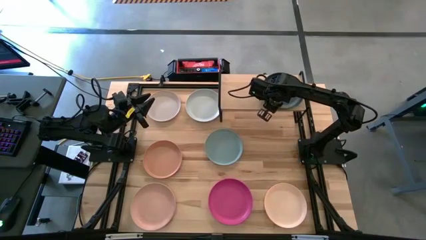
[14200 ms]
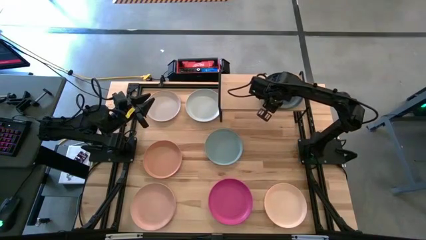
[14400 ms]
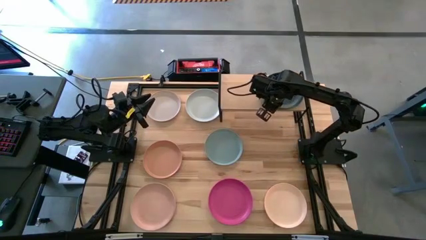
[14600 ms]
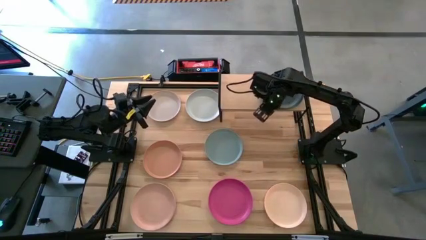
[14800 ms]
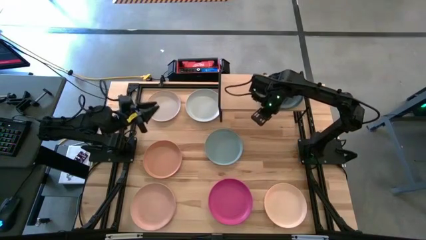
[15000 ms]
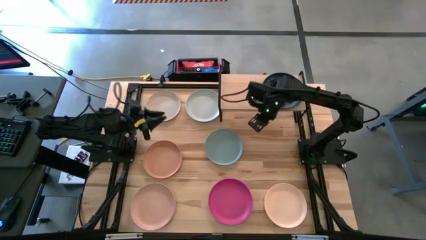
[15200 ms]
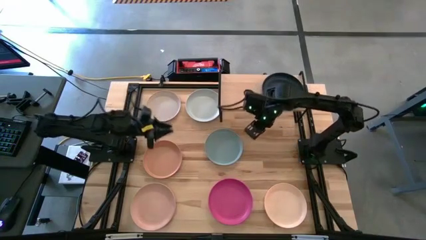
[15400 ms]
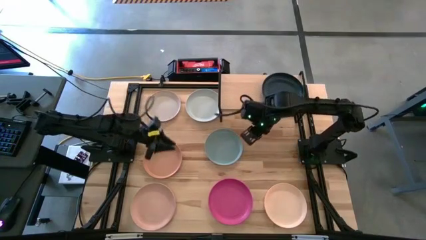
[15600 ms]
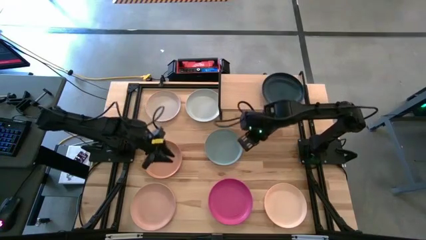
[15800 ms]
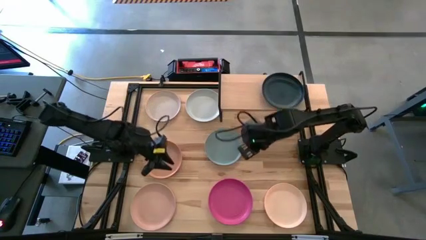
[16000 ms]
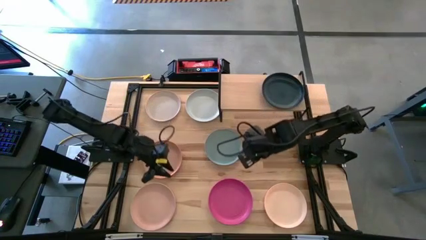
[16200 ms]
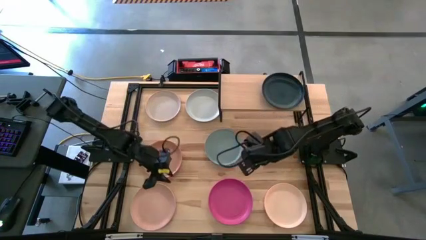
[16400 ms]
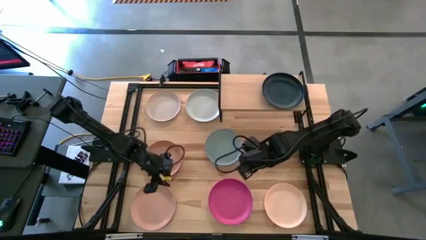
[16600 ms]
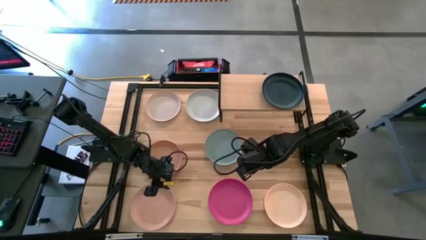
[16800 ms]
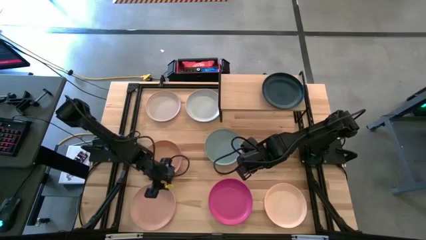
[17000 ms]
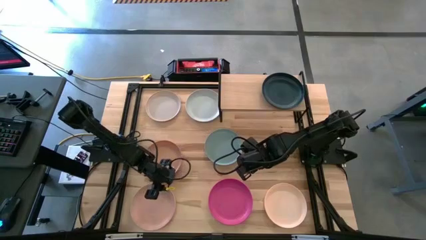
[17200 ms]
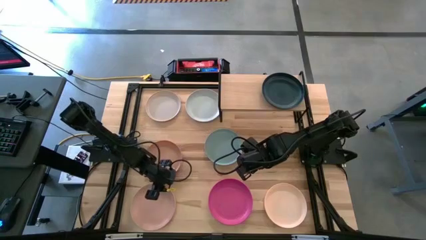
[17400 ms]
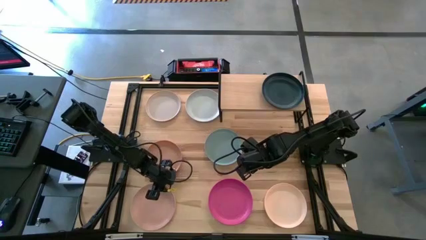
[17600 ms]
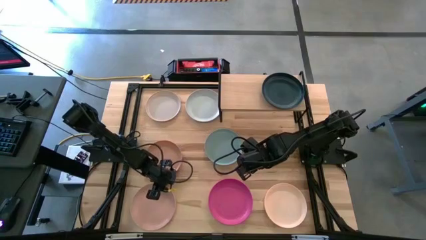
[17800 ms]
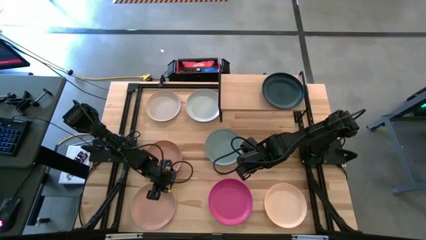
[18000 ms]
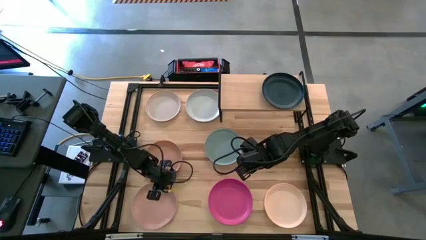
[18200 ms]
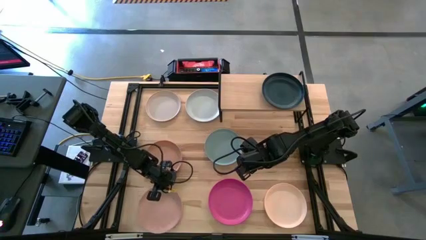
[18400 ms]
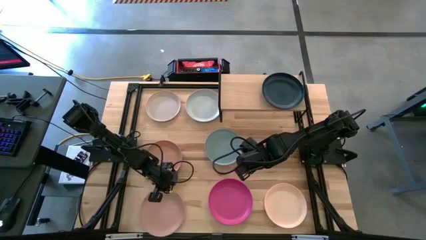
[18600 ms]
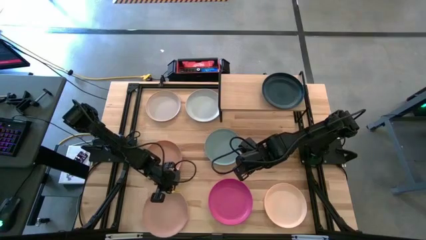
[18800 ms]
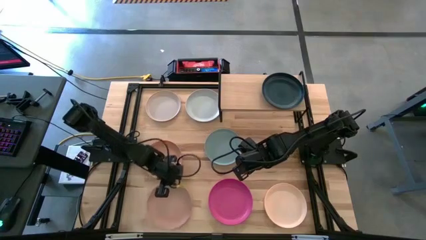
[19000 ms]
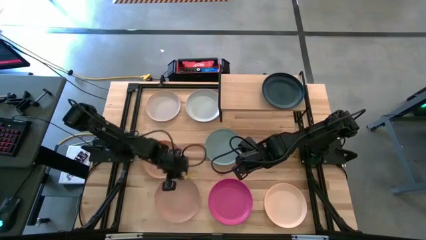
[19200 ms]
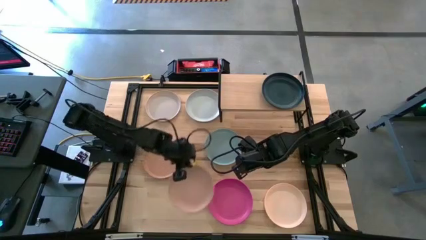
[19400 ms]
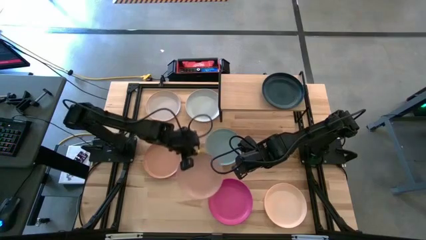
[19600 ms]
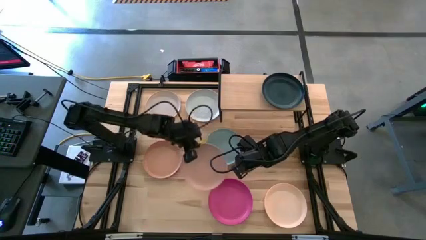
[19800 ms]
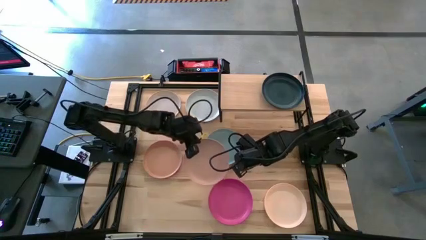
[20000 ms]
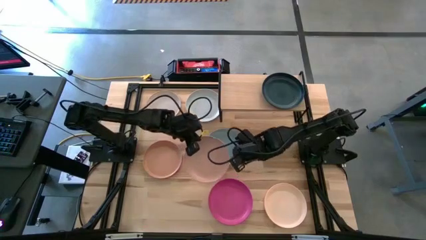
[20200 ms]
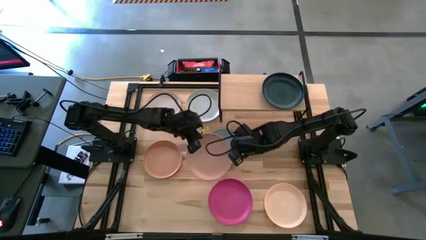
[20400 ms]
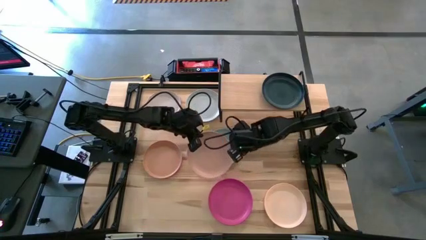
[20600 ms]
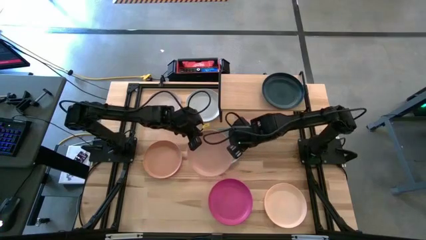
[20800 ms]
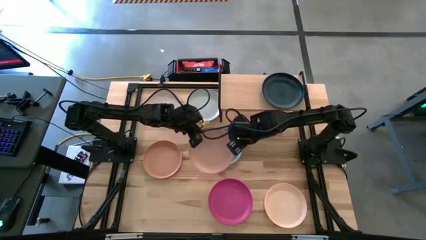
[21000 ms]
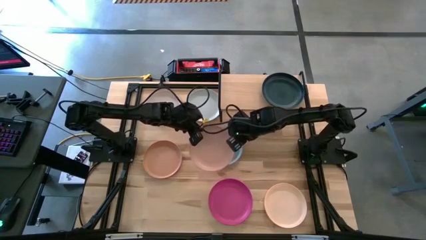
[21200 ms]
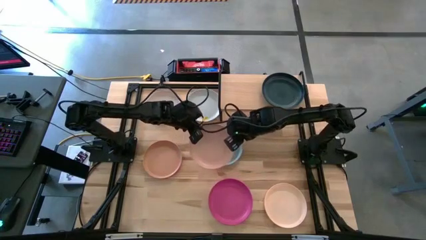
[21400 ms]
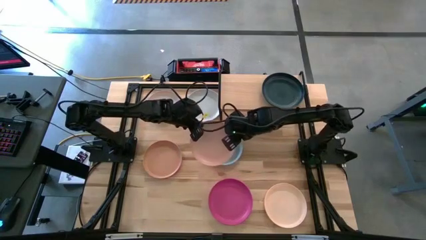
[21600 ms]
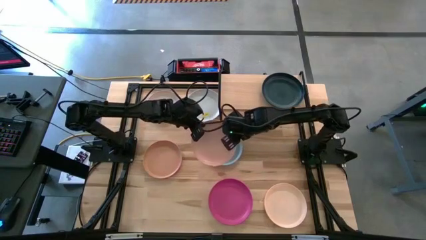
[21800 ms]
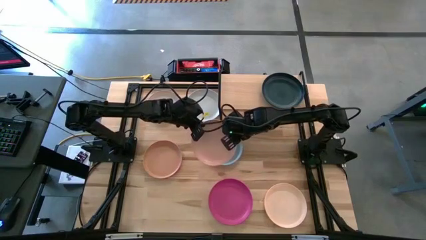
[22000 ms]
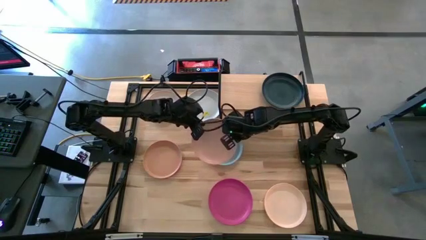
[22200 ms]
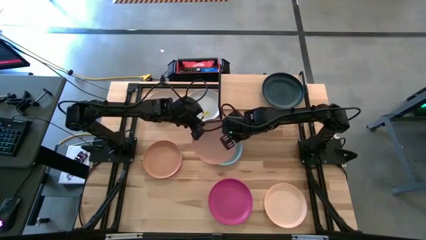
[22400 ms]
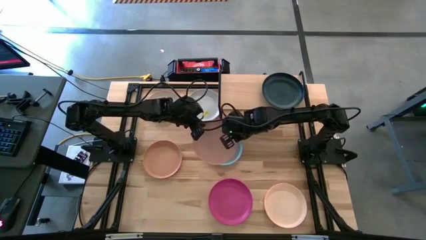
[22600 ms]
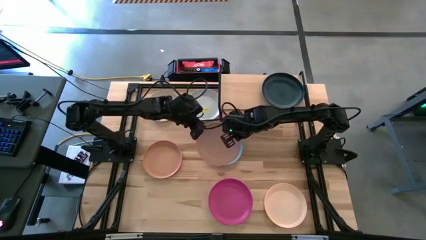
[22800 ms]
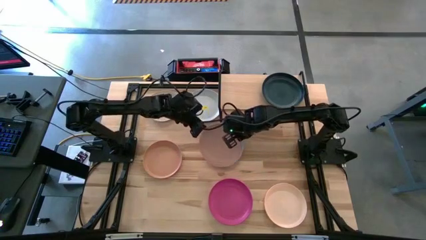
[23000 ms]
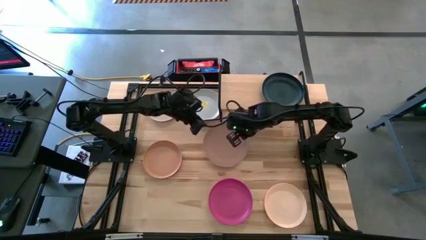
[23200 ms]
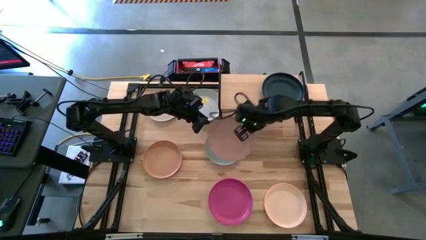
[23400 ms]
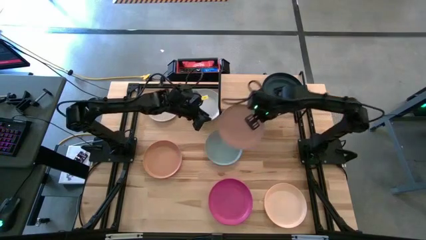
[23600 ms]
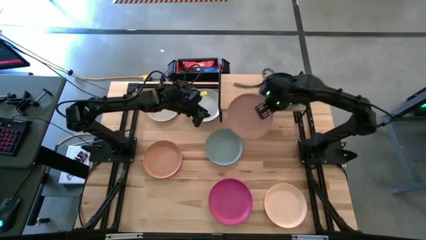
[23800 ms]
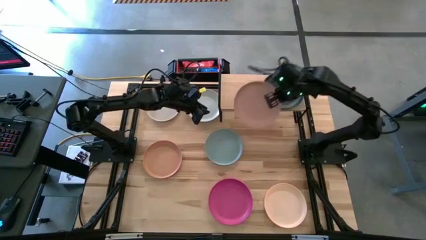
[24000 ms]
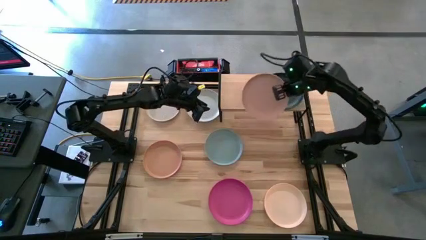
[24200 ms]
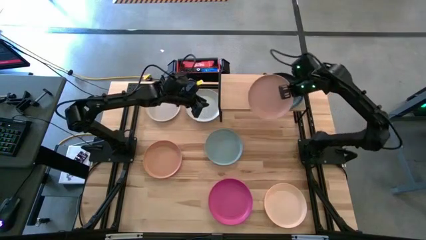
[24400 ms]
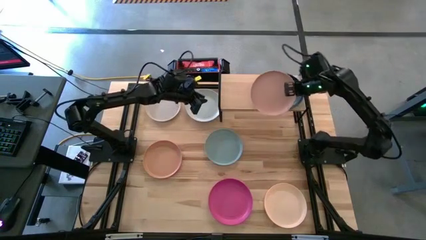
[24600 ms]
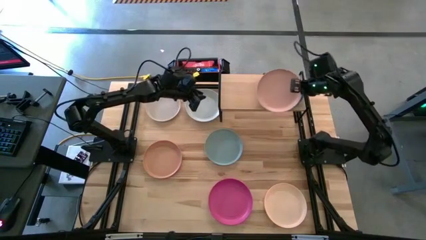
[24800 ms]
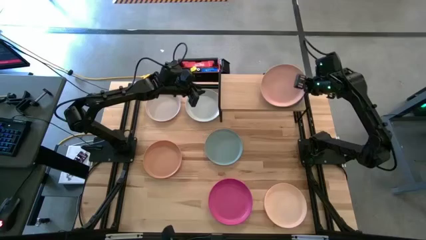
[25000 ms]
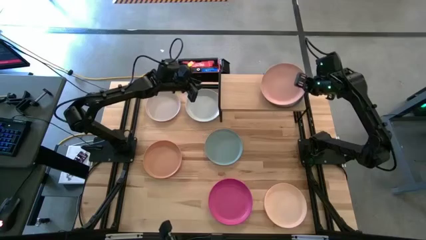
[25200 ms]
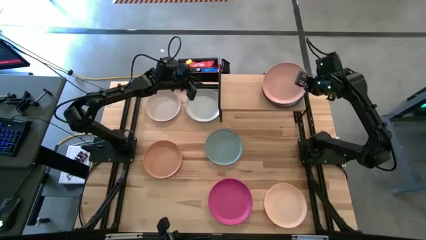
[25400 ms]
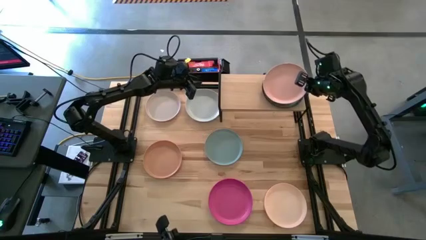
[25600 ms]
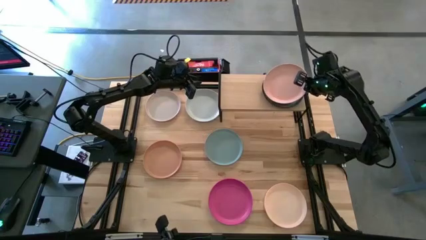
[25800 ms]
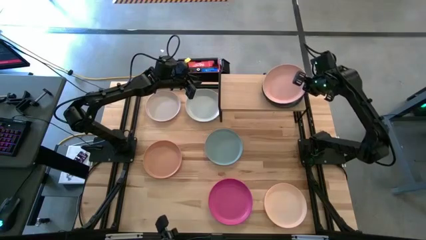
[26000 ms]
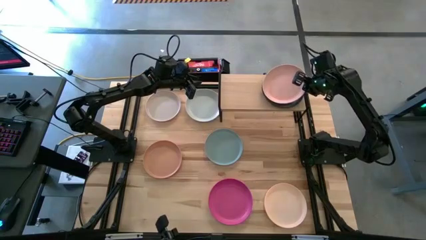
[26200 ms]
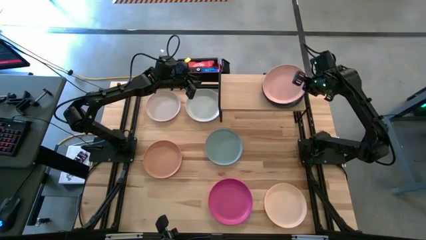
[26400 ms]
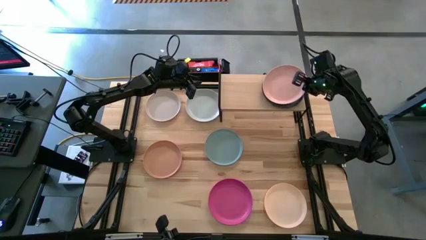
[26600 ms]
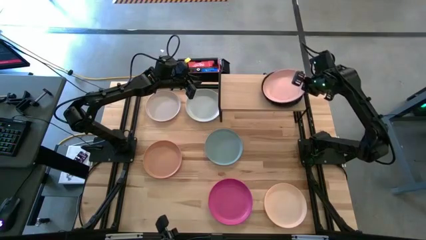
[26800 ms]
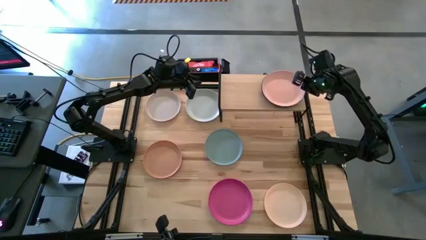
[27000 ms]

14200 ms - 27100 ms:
Task: Place and stack plates onto a shelf
Stack the bottom left light brown plate on top of the black plate on the shelf

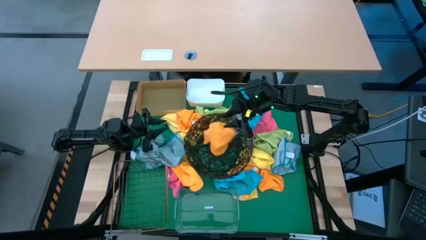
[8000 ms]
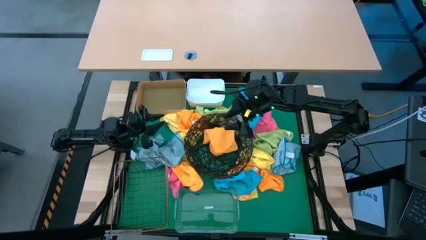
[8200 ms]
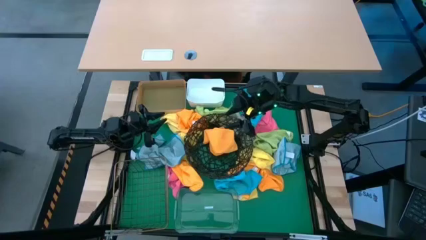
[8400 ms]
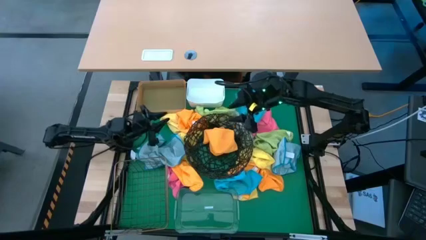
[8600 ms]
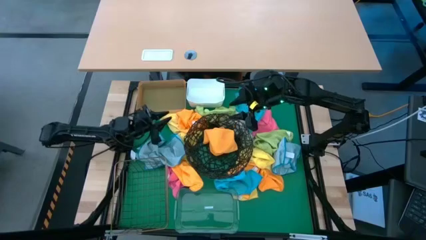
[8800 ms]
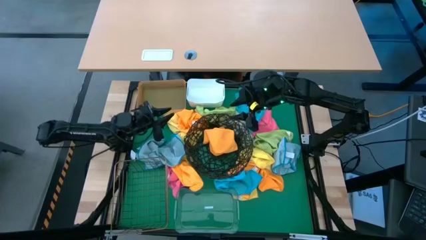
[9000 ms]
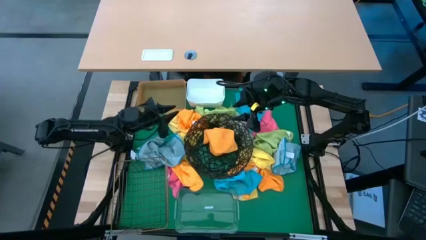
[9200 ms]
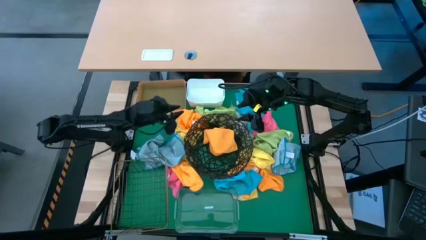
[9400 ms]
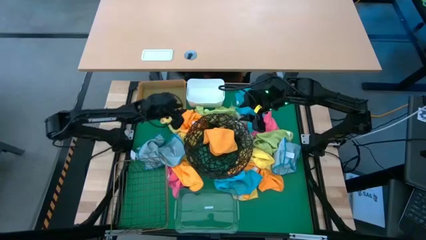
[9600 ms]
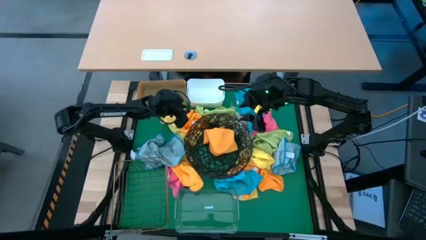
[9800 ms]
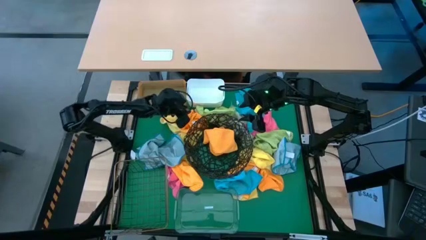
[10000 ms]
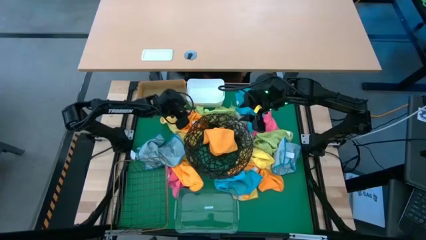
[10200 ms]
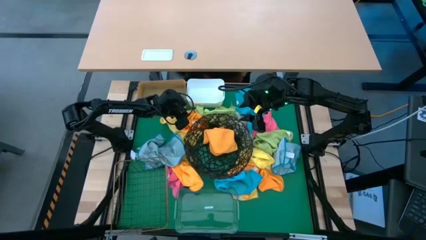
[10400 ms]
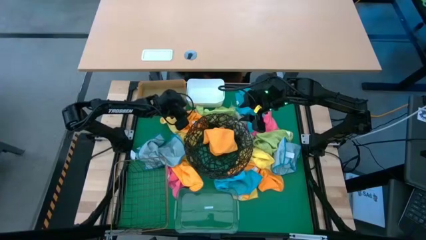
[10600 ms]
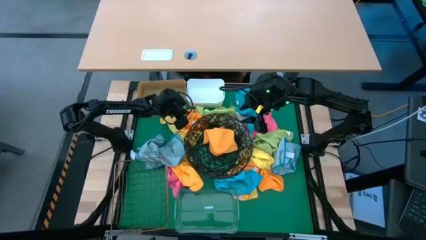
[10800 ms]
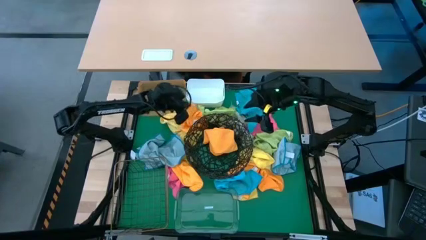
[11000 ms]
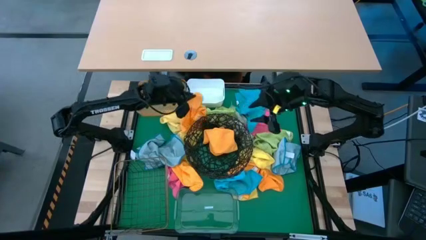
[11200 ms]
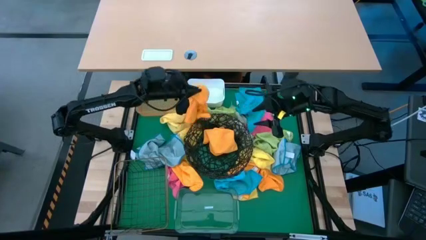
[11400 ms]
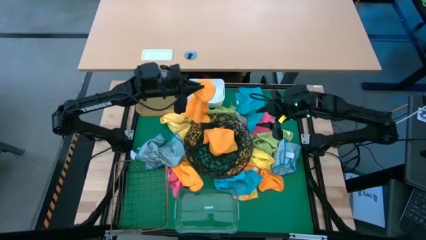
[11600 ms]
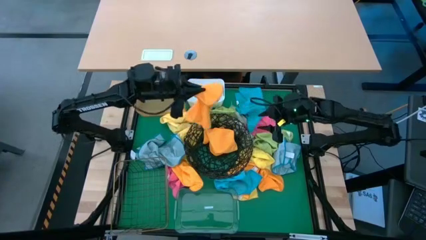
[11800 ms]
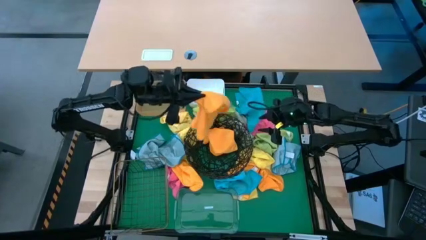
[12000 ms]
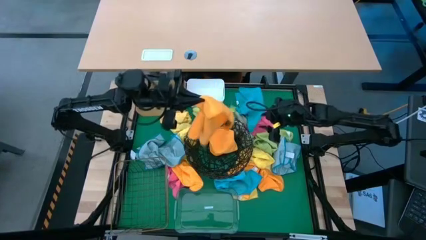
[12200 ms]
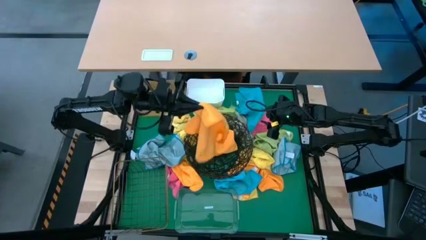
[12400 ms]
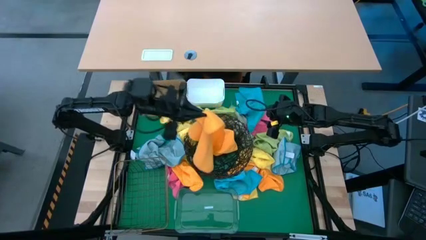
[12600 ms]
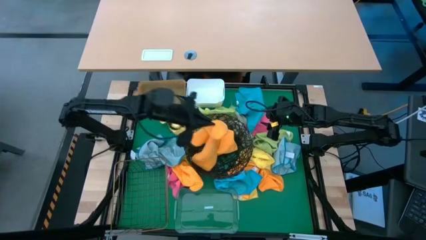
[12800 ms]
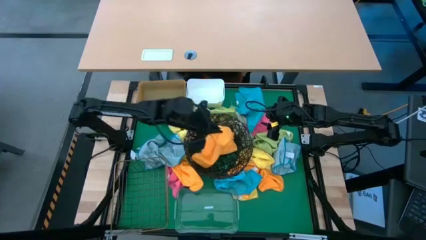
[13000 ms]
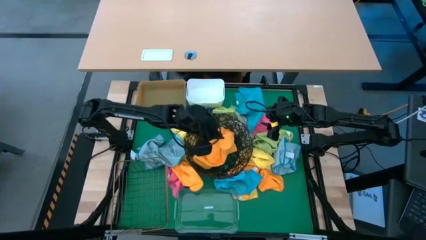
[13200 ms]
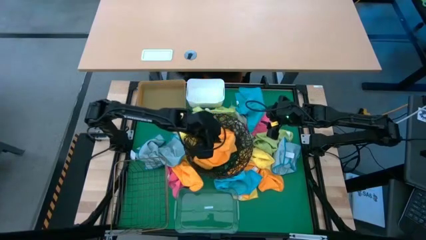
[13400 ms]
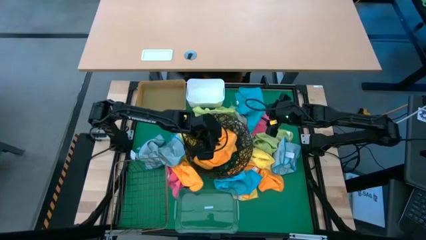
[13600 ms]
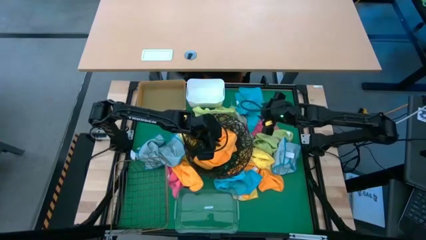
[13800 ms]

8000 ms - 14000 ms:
Task: Sort microfiber towel by color & place in baskets
Put the orange towel into the black wire basket
